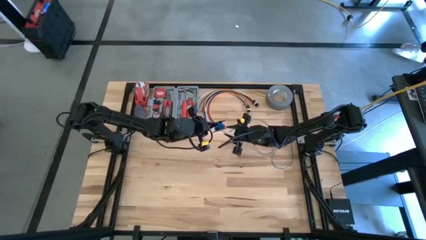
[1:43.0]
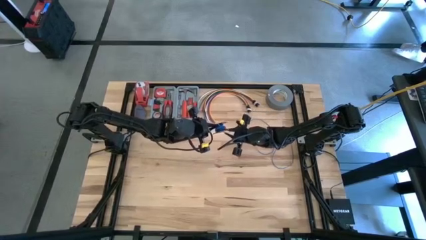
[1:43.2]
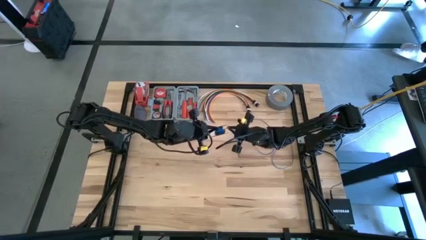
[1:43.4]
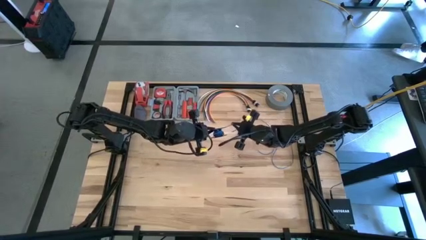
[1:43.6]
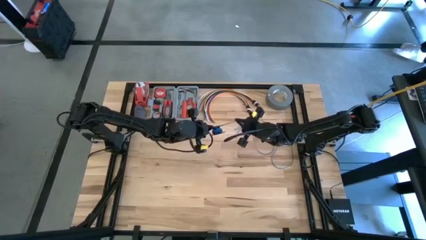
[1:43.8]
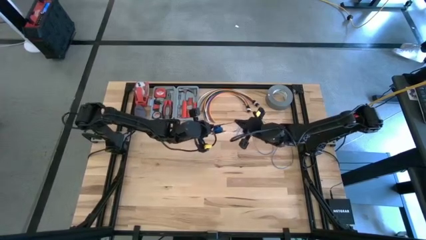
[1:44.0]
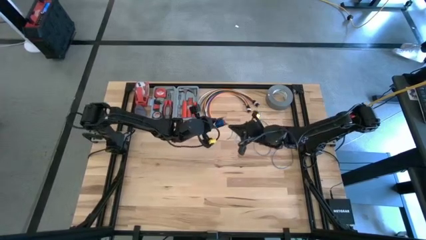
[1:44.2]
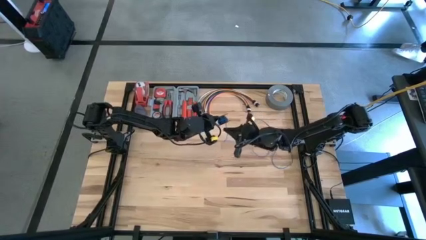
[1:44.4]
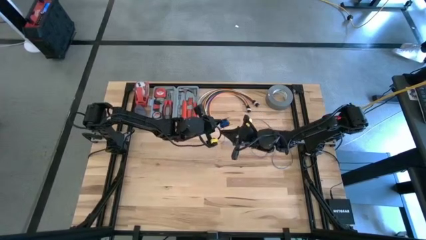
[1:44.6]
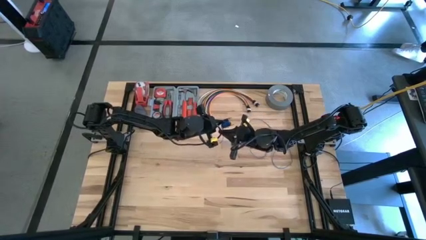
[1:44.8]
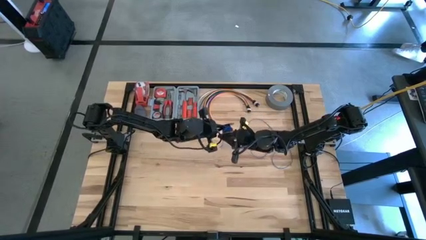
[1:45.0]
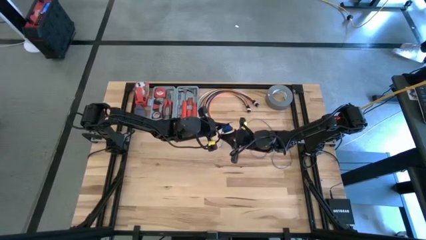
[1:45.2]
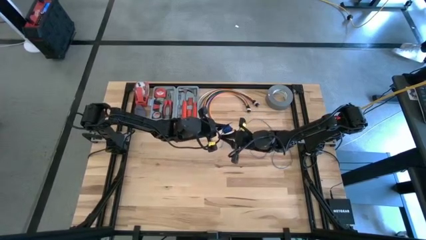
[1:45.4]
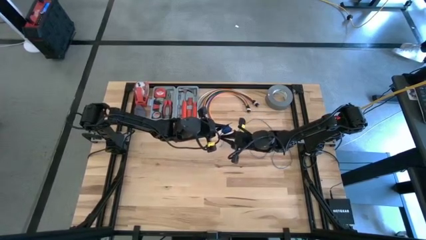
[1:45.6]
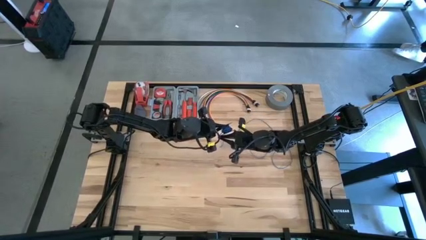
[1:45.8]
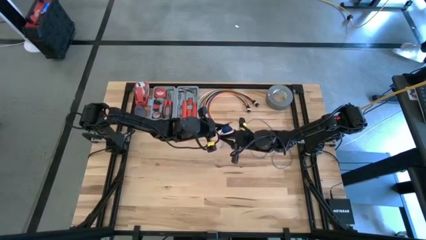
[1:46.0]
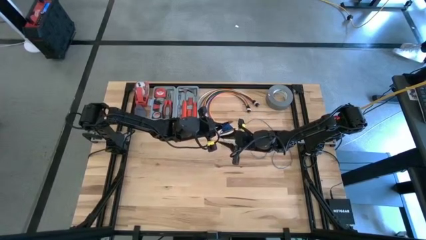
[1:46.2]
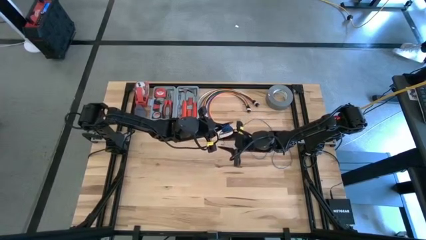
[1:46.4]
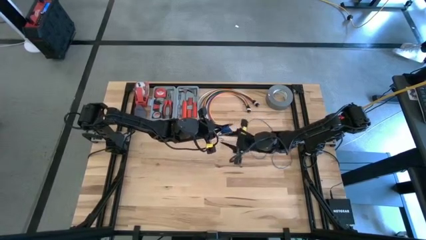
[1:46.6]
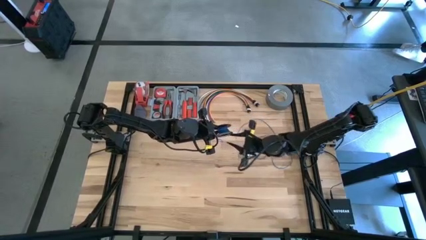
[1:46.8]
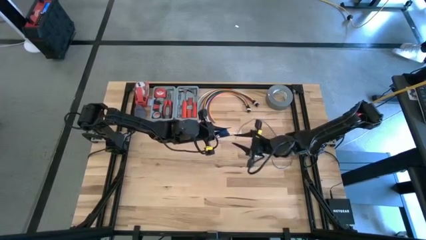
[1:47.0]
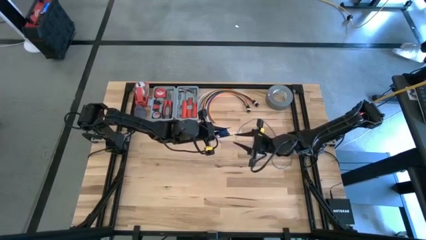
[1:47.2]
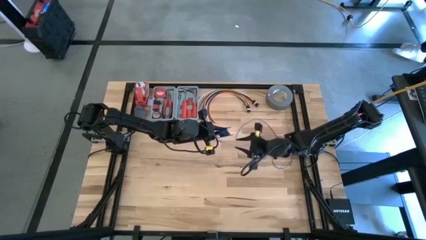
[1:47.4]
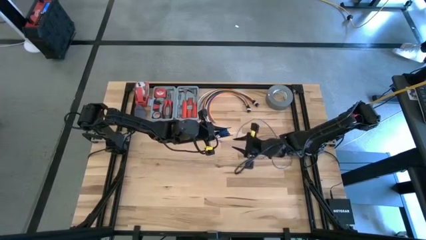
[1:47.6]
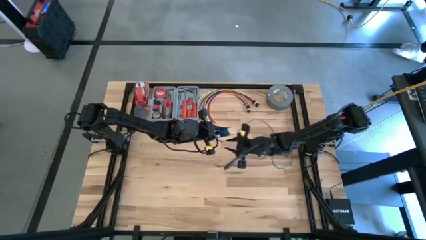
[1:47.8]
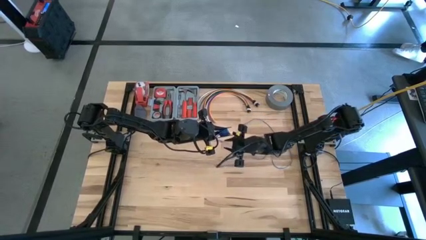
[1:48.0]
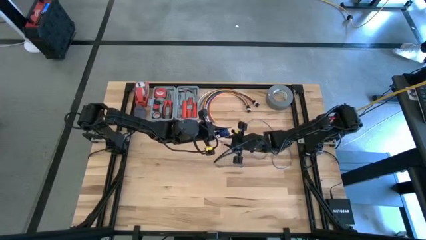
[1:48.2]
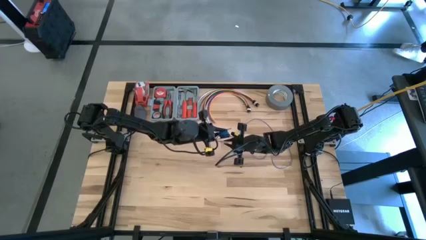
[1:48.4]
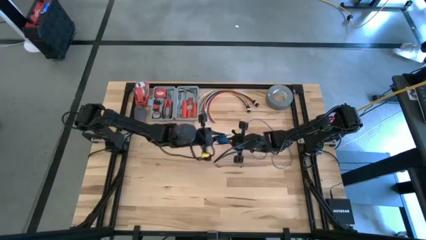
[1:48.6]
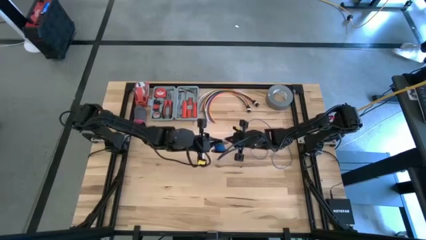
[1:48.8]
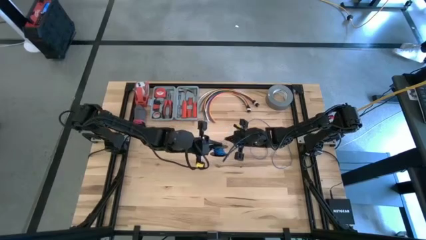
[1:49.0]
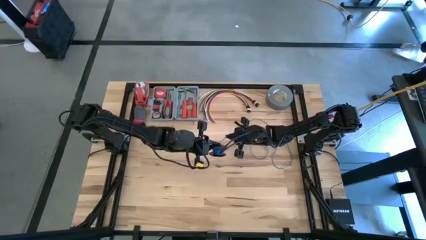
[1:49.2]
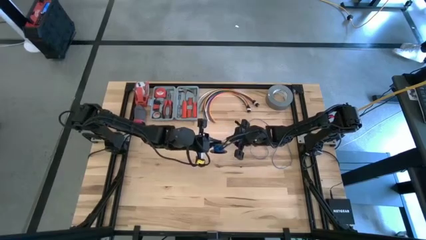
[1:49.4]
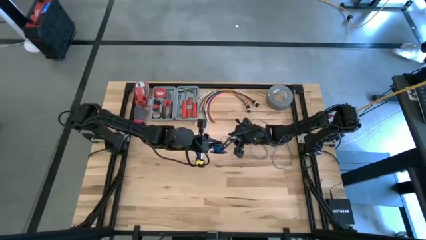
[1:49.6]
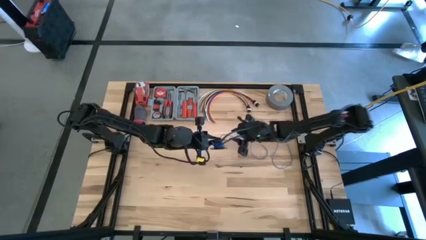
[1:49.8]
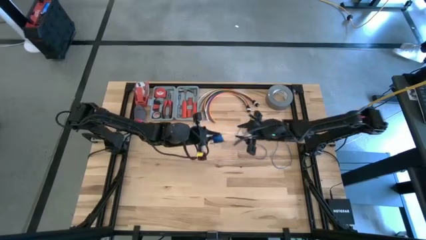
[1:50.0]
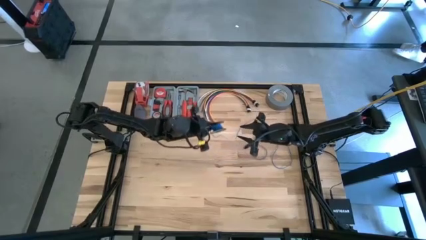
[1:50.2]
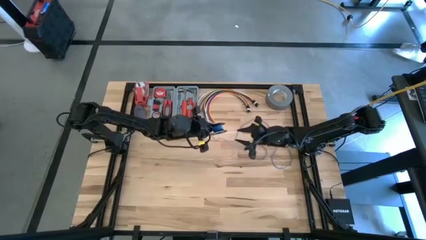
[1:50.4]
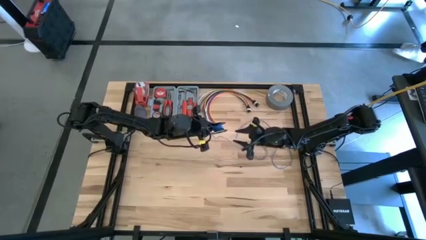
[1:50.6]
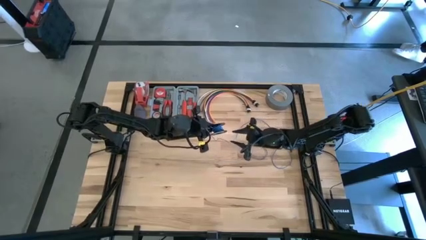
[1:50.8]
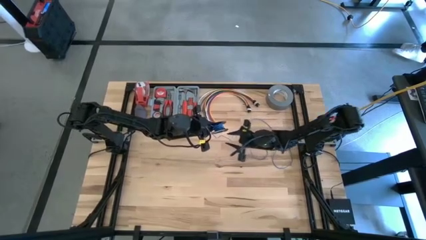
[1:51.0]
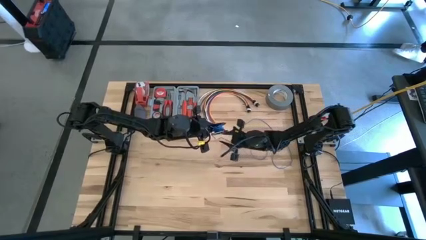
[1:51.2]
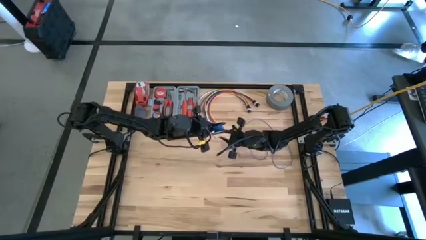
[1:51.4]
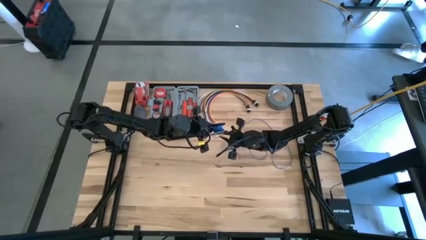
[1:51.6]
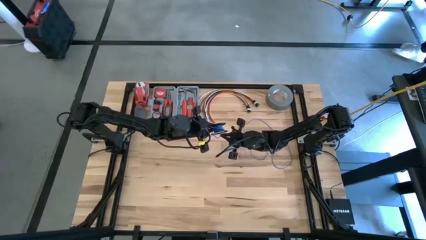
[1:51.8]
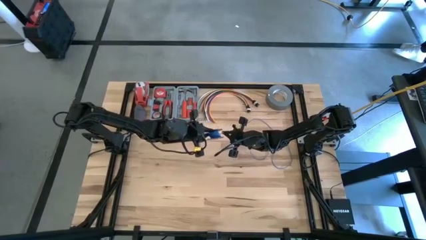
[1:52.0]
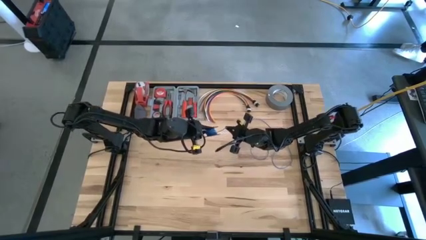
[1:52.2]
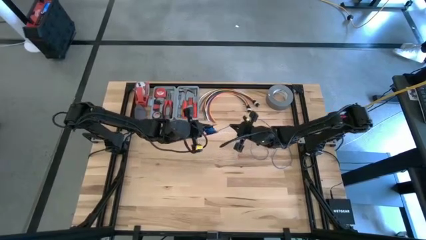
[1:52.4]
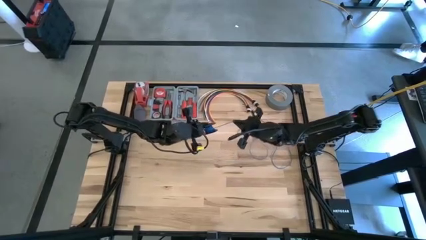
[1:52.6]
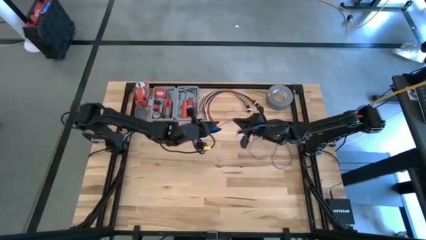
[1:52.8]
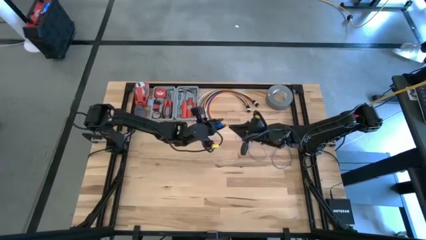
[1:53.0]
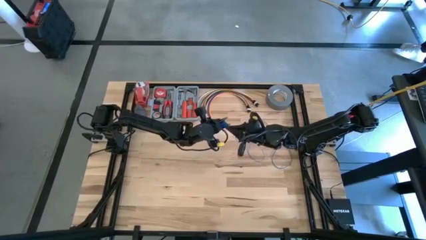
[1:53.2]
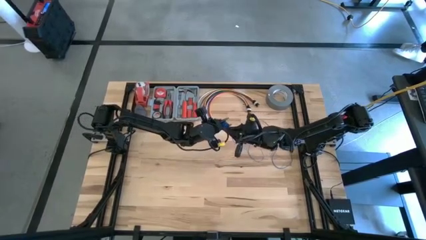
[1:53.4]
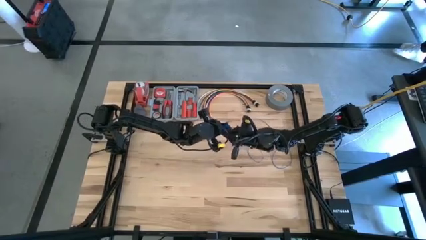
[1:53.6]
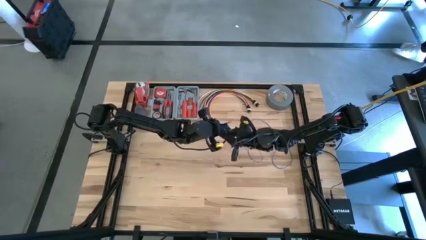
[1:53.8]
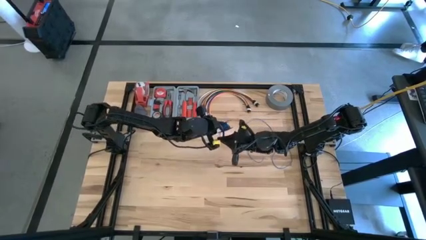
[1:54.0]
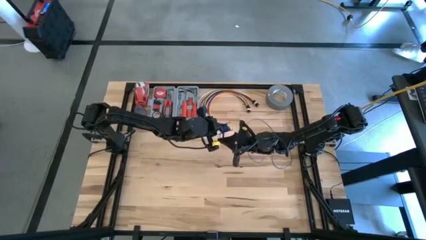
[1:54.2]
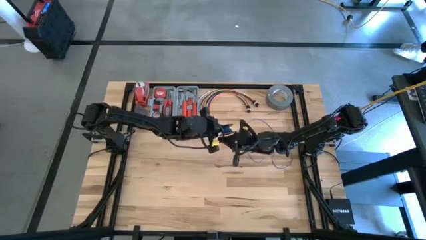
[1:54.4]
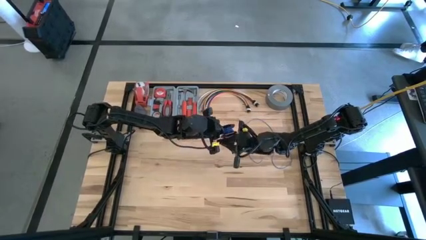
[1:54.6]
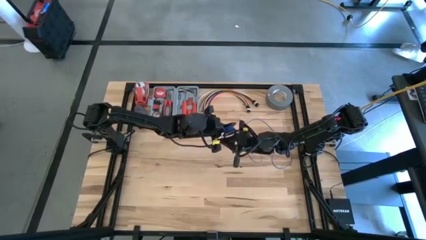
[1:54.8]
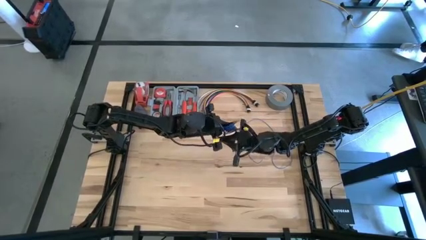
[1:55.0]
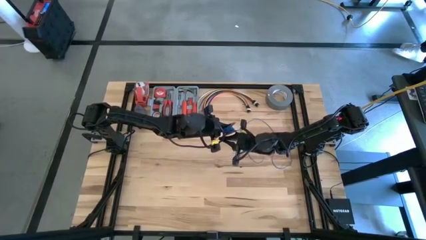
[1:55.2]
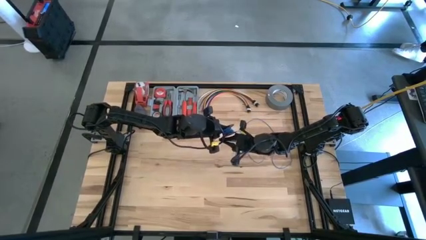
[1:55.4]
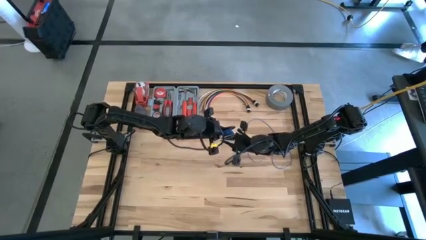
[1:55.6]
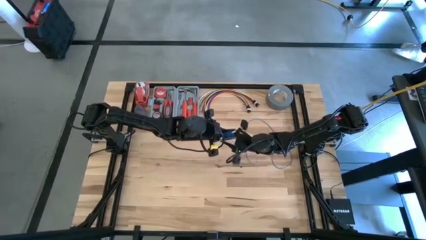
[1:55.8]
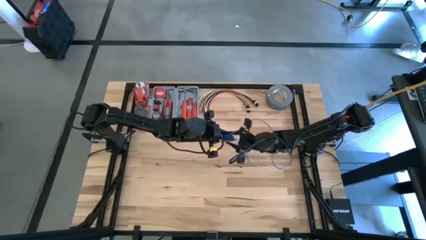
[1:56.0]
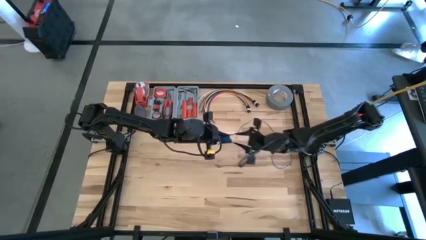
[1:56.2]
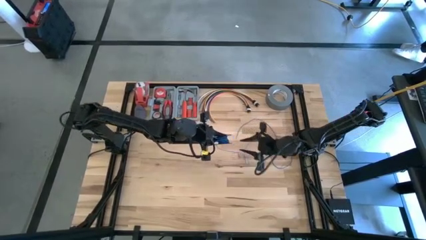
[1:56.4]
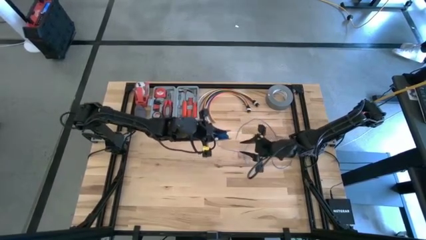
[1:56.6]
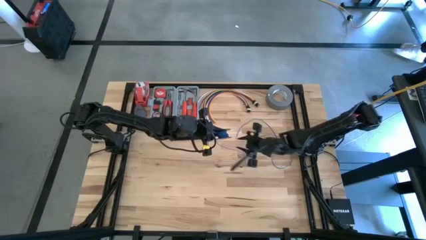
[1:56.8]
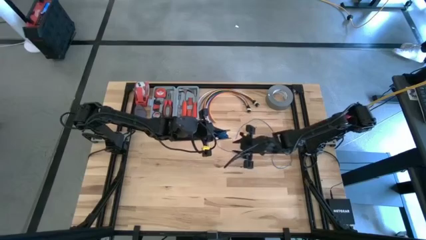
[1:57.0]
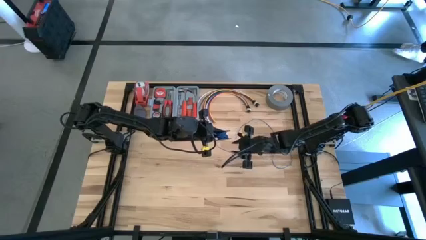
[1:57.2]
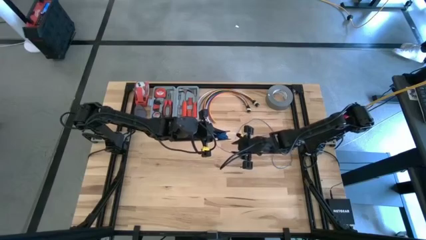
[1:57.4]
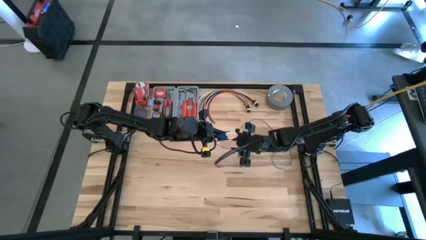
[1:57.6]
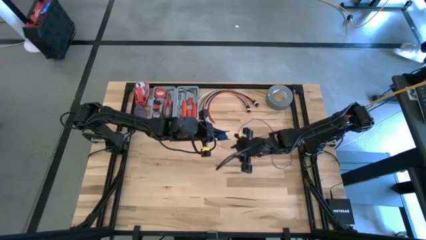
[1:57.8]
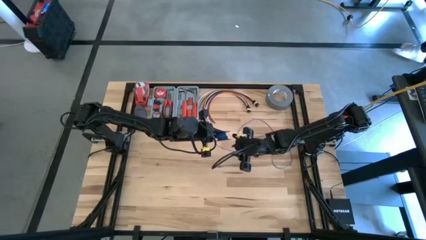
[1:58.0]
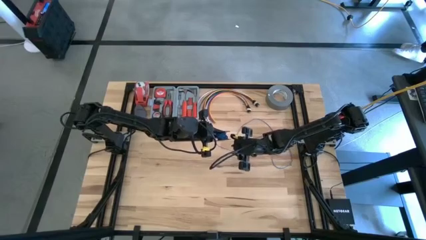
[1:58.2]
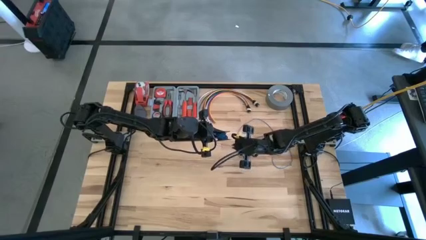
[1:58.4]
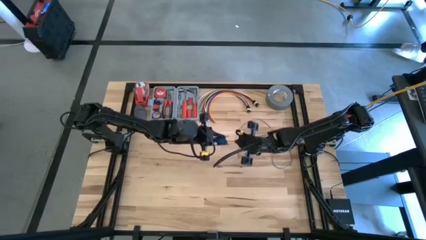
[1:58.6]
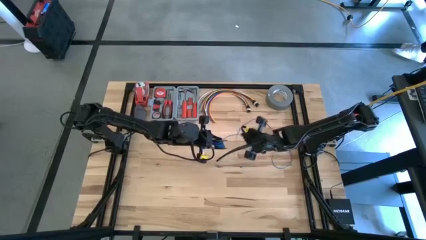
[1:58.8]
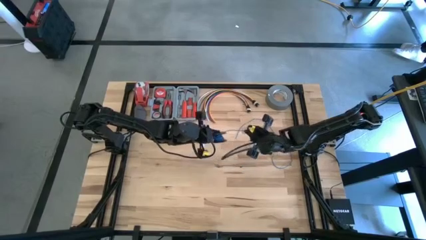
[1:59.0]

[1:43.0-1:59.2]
Task: Coil cords
Coil the blue wire onto the black spool
